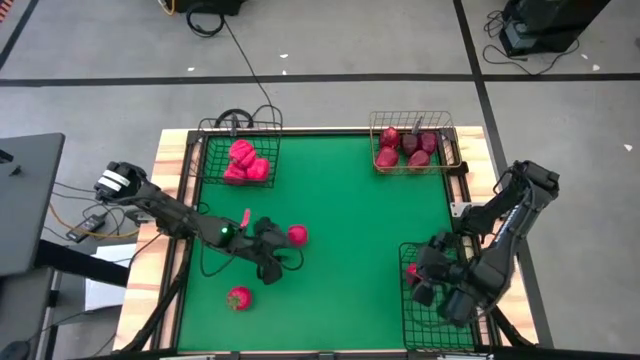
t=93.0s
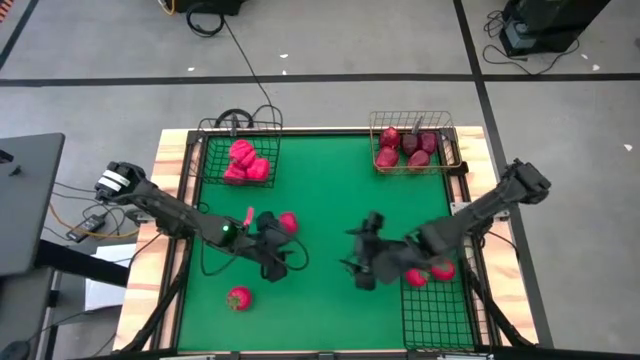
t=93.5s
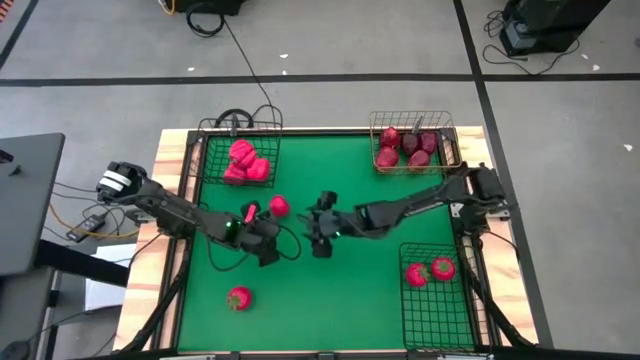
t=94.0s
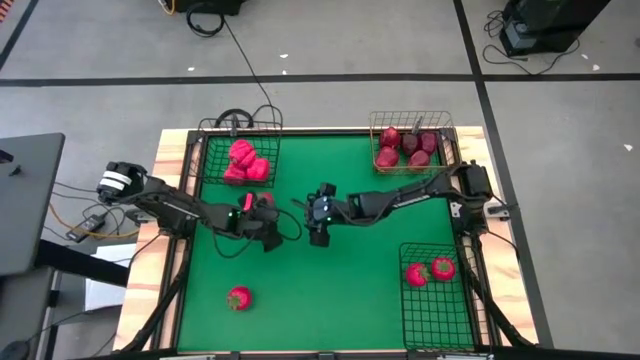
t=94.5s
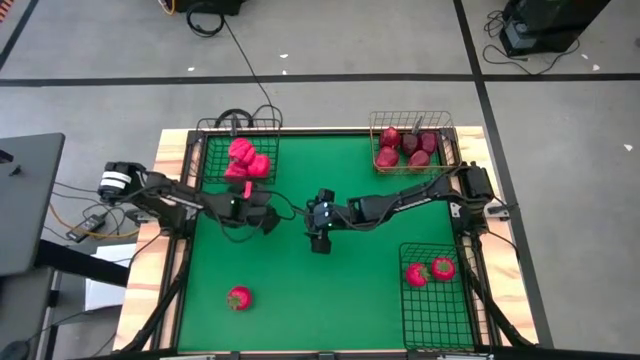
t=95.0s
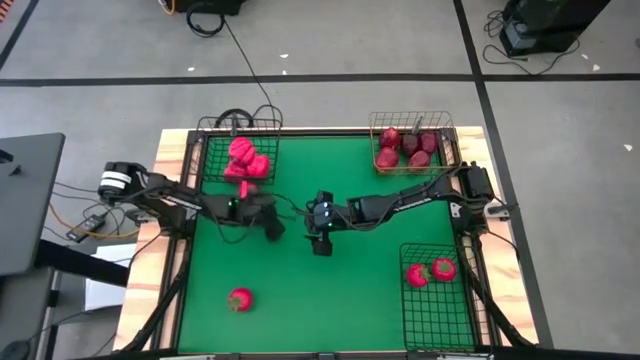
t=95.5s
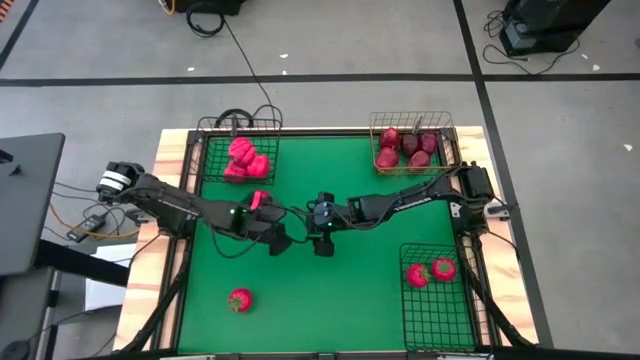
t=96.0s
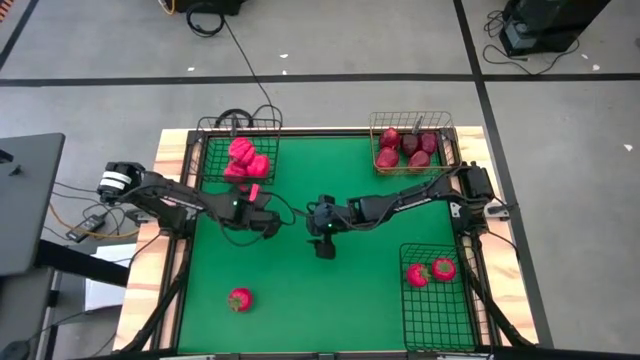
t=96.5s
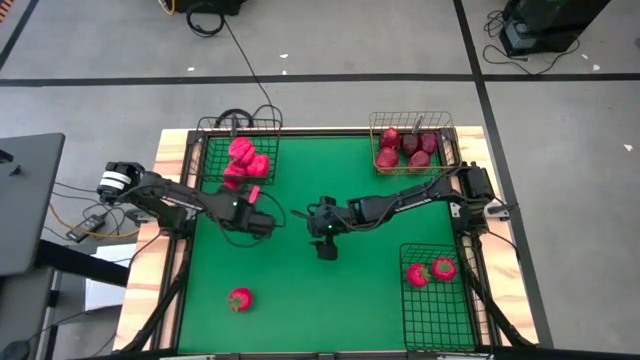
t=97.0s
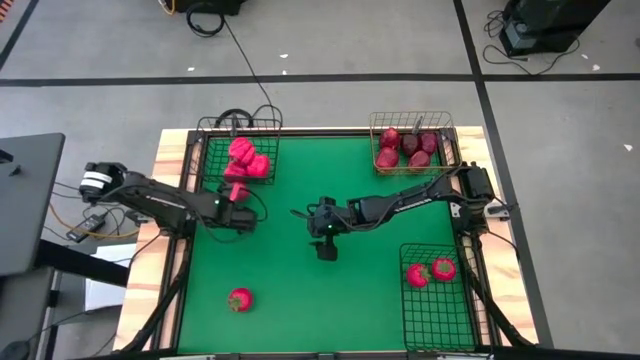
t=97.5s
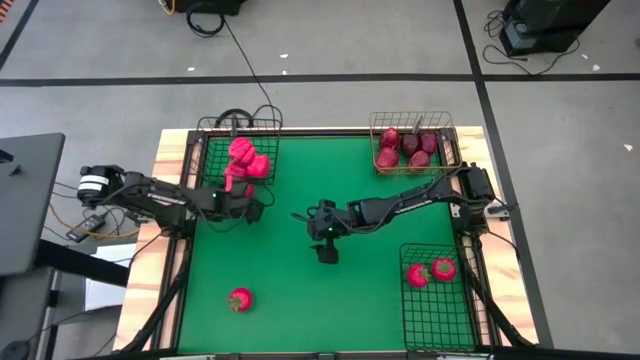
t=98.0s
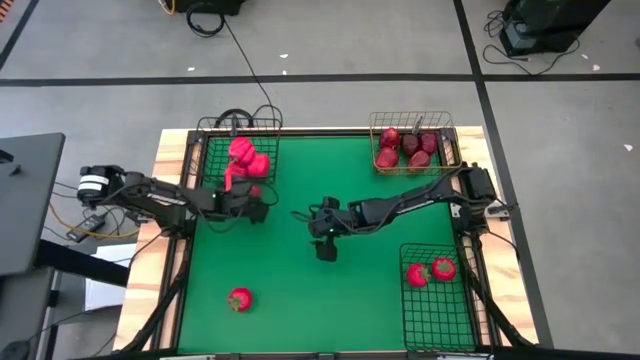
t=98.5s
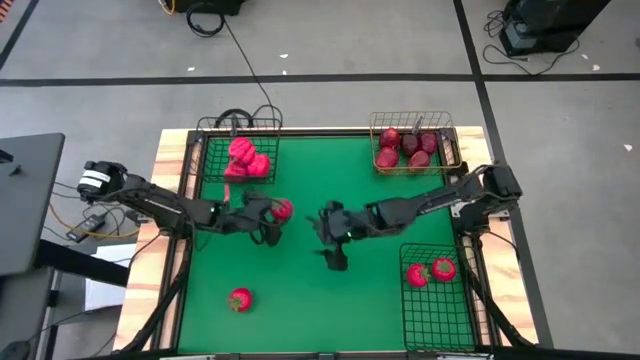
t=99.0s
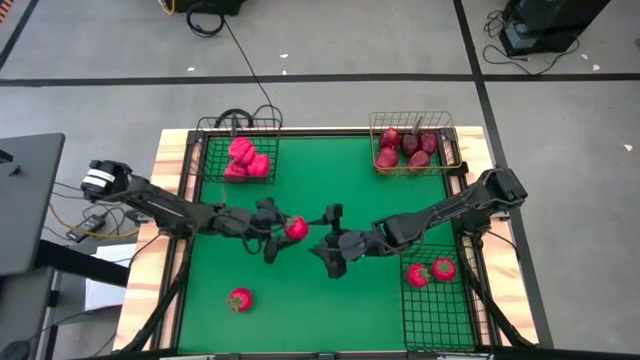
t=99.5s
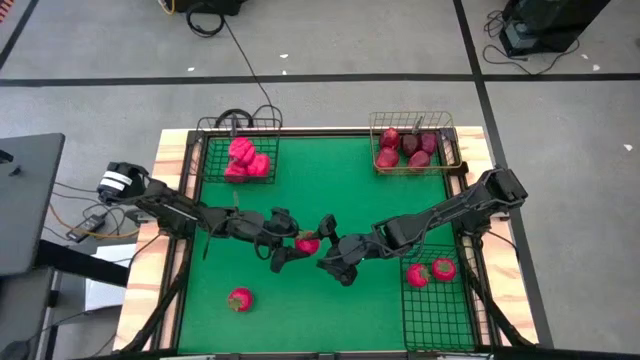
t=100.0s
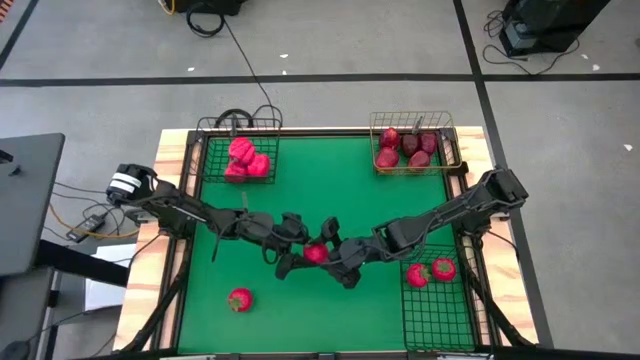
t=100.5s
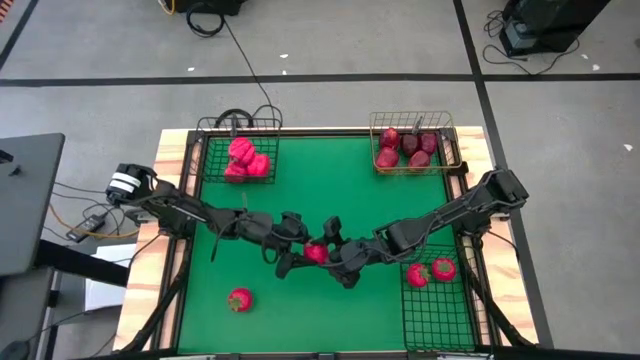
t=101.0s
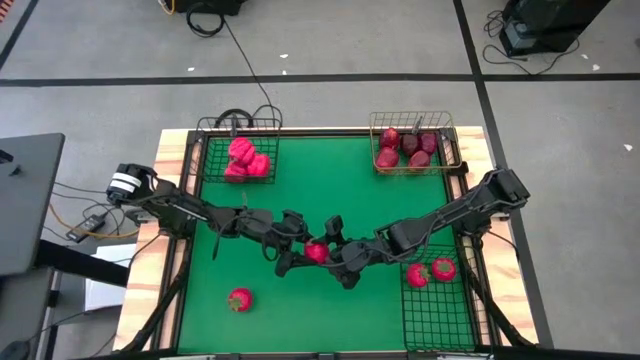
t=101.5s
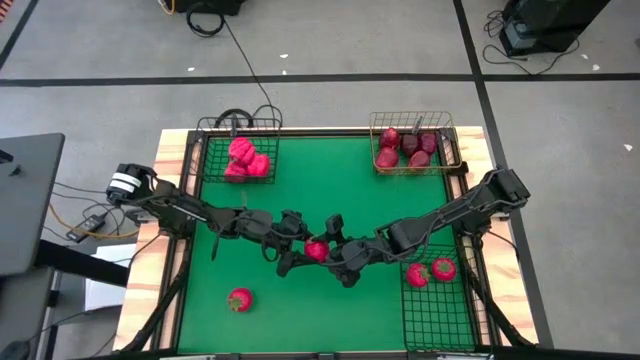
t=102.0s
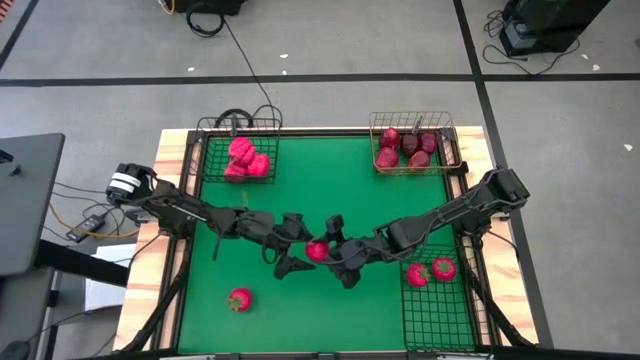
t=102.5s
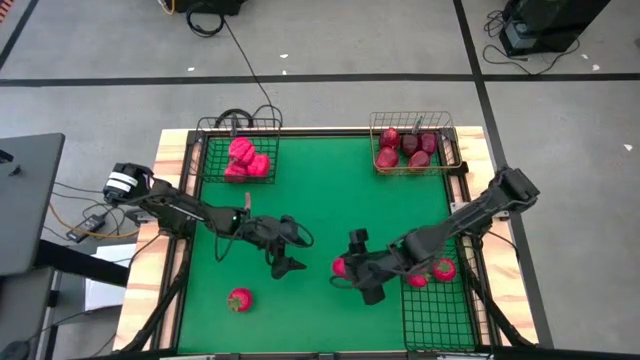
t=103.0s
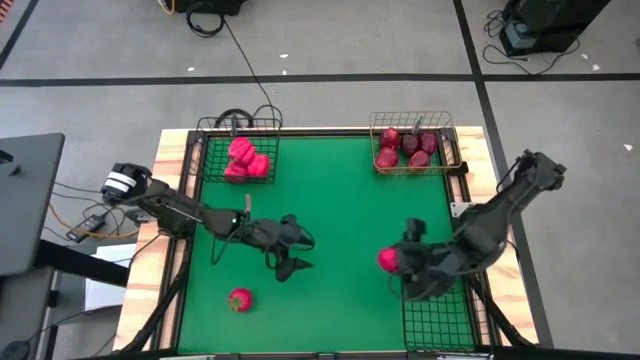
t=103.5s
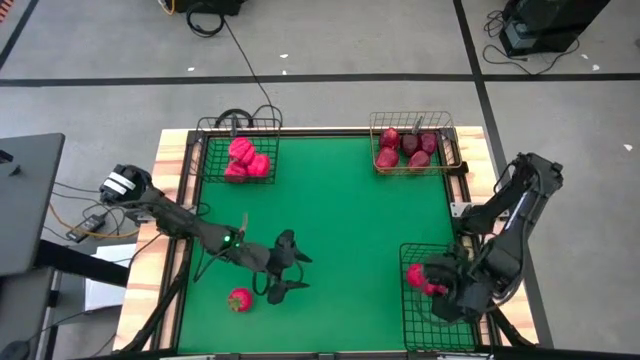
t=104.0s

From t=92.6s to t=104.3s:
Task: Sort produce into baskets
Put the red tomato into the bottom black black wire basket

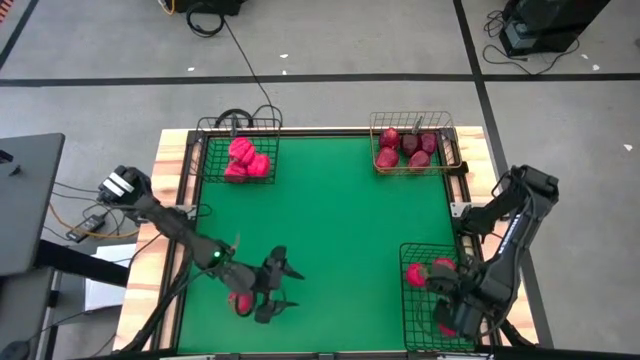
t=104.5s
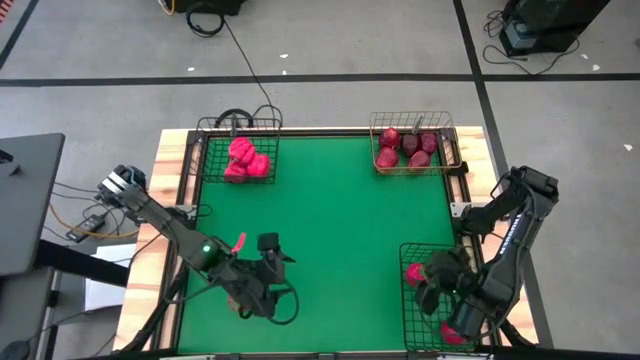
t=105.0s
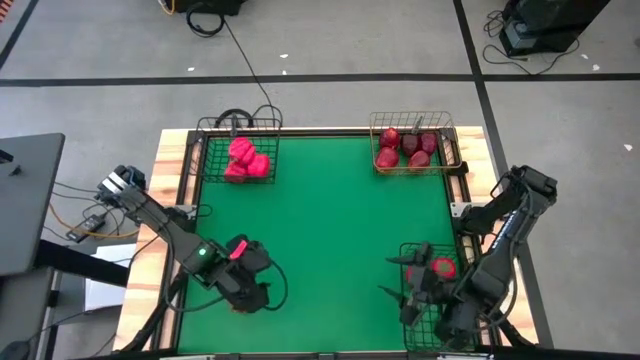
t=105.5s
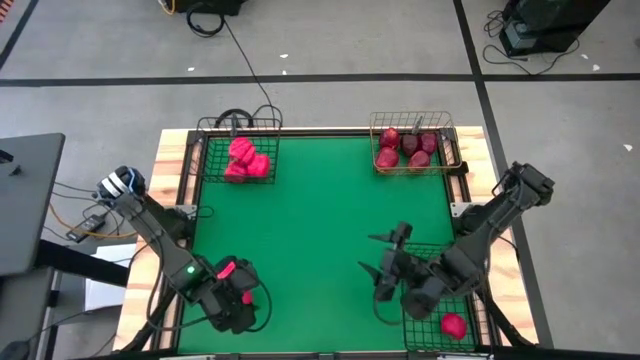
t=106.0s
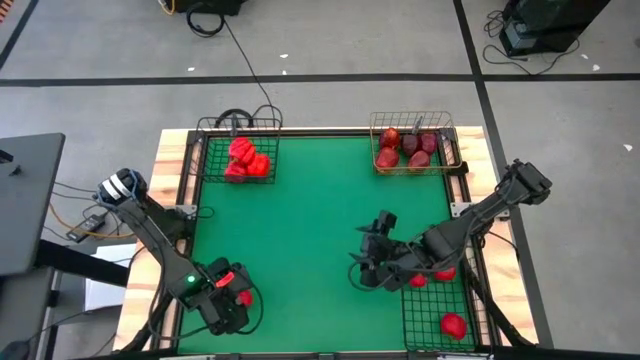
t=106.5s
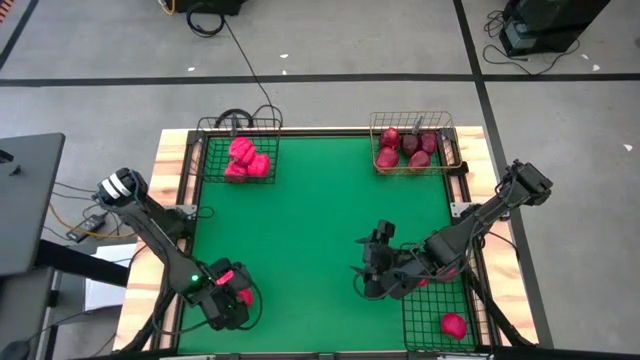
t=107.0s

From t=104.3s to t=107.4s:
Put the red tomato into the bottom black black wire basket

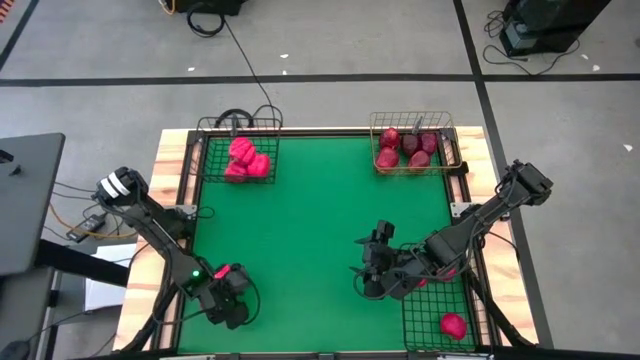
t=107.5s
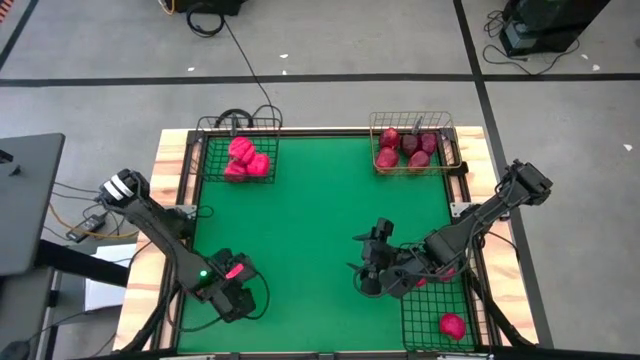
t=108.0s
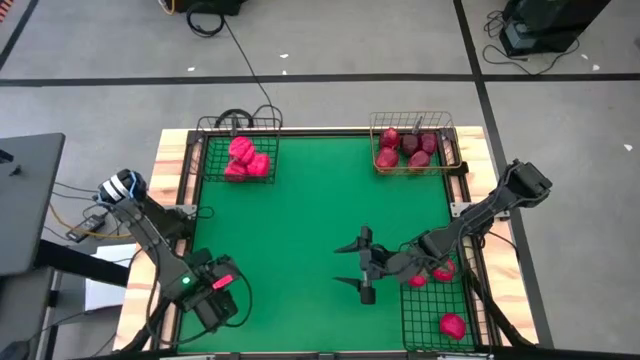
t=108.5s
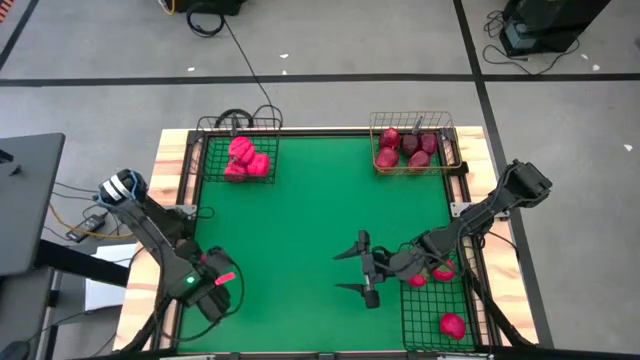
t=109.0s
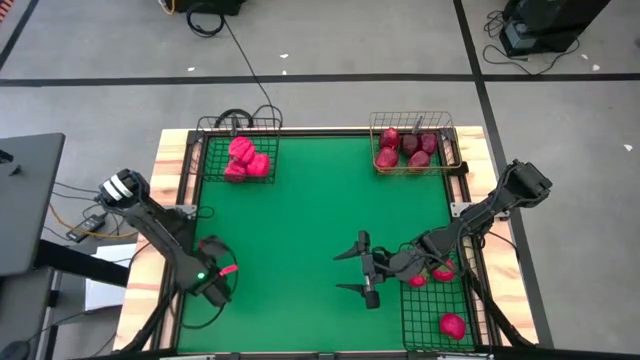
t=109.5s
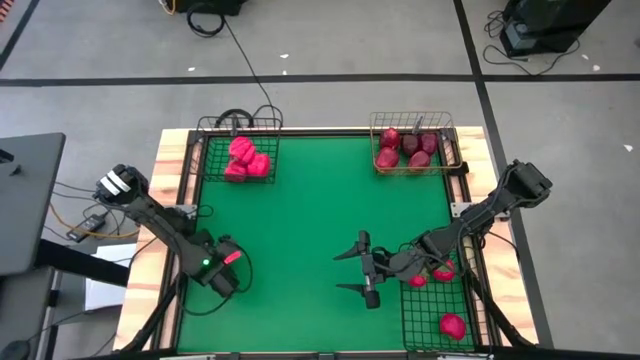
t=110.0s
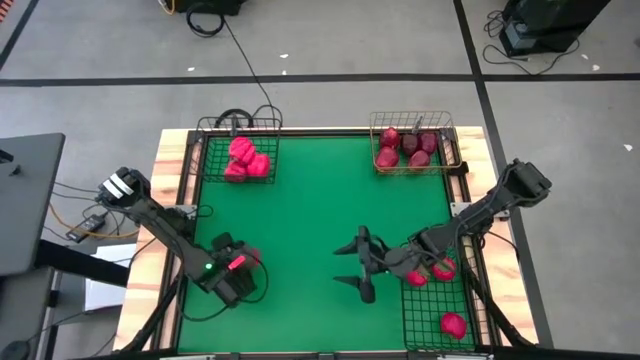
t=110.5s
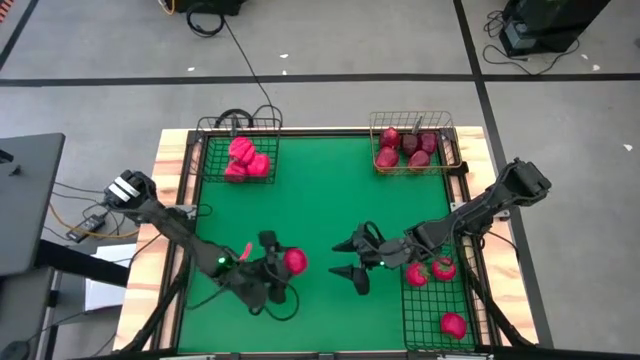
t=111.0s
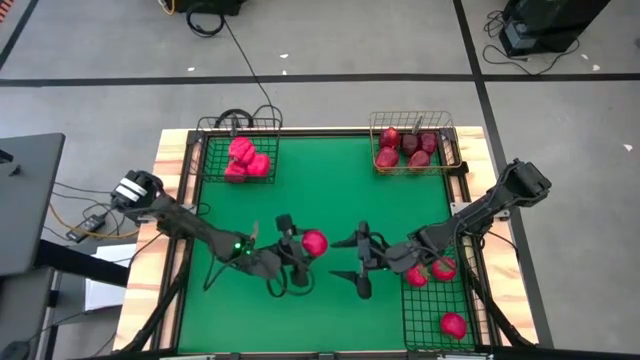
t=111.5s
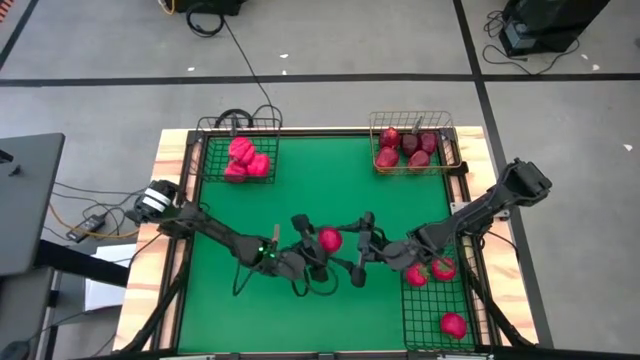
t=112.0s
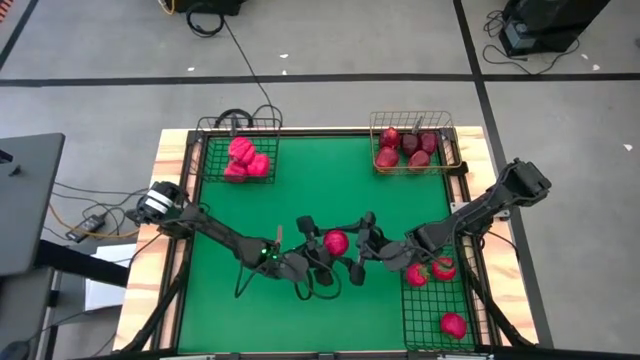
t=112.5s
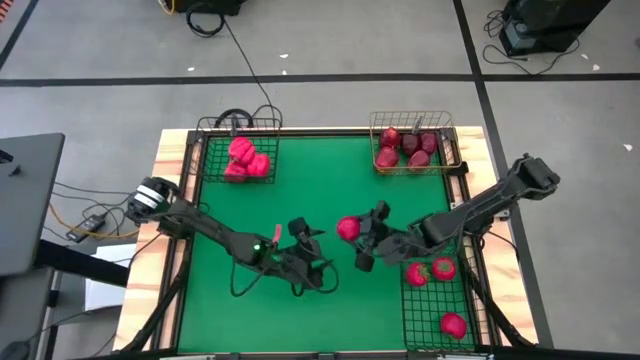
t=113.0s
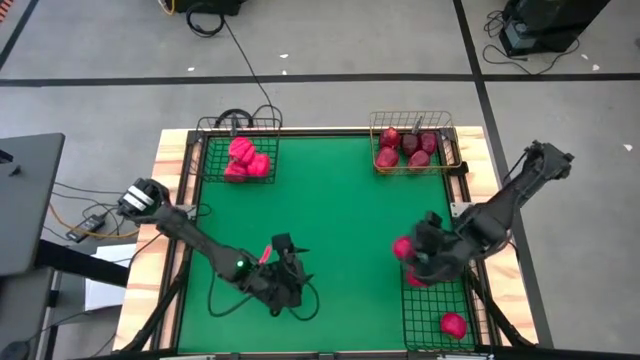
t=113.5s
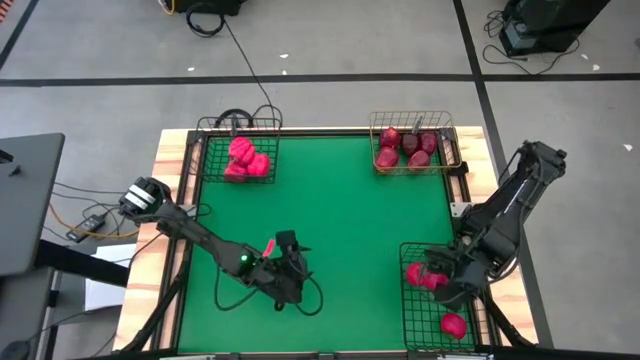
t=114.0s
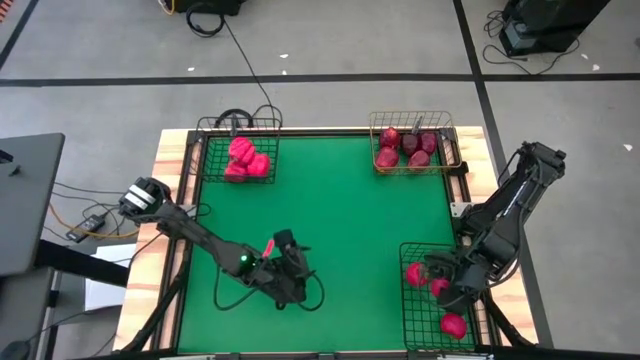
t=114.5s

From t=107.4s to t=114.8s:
Put the red tomato into the bottom black black wire basket
